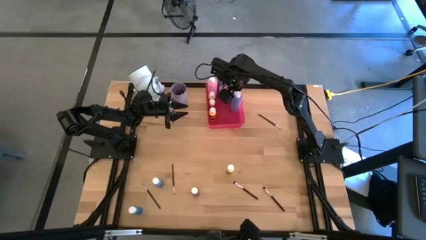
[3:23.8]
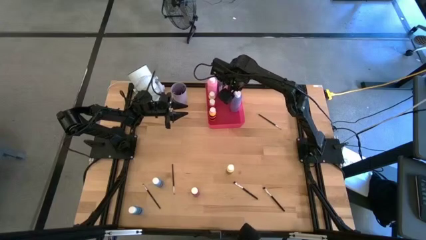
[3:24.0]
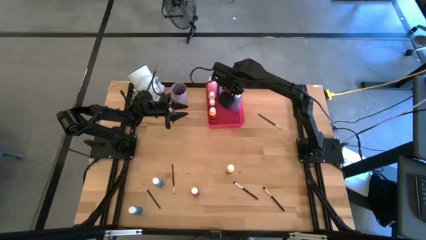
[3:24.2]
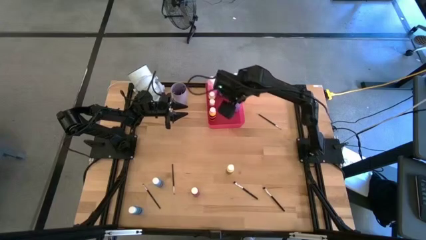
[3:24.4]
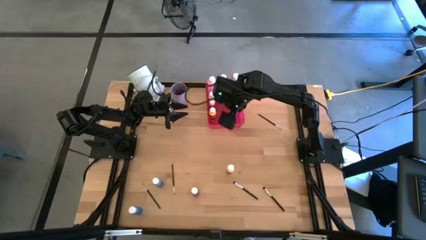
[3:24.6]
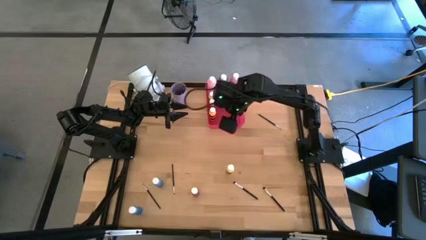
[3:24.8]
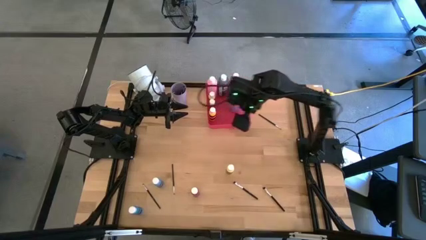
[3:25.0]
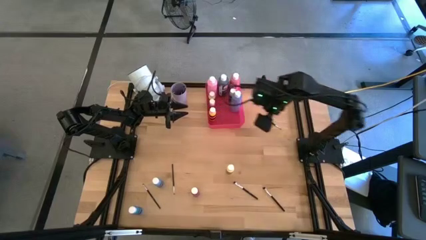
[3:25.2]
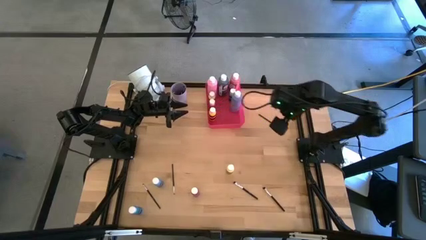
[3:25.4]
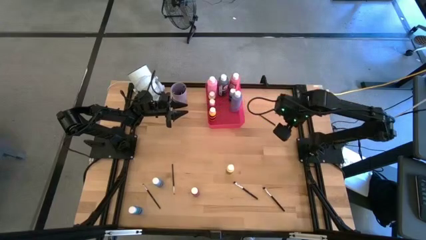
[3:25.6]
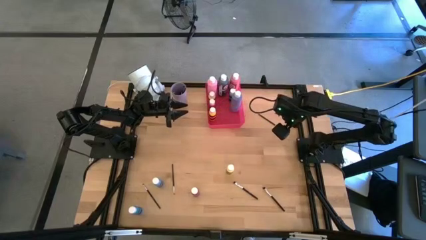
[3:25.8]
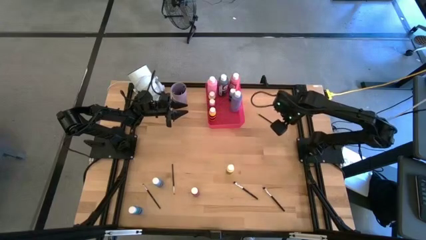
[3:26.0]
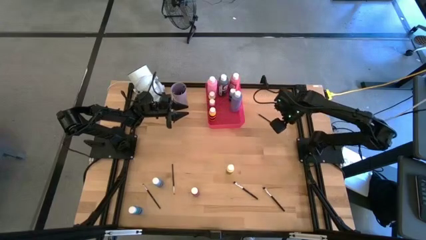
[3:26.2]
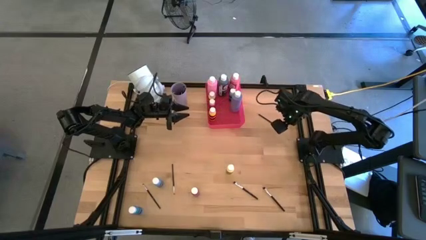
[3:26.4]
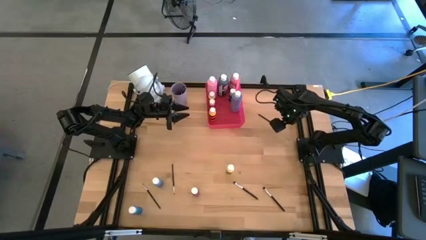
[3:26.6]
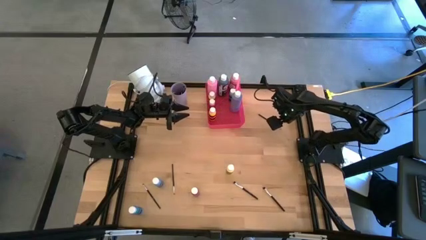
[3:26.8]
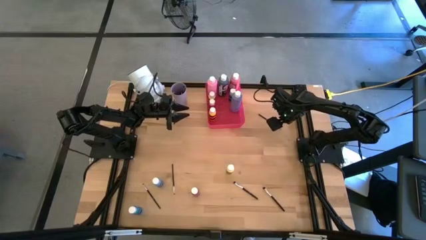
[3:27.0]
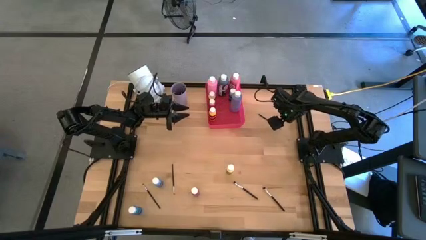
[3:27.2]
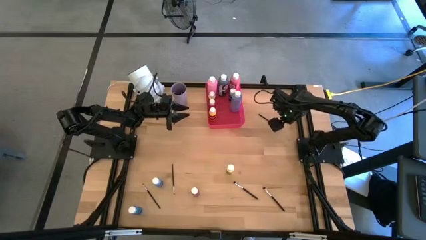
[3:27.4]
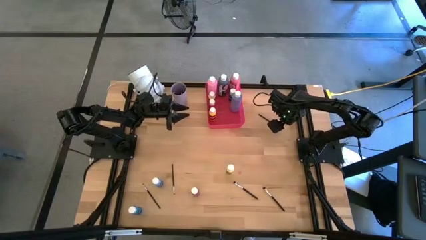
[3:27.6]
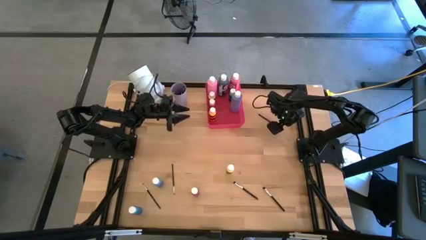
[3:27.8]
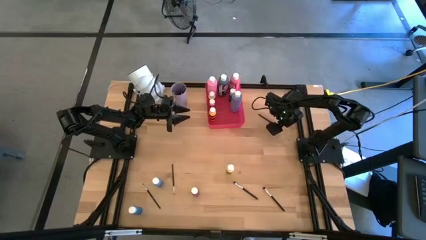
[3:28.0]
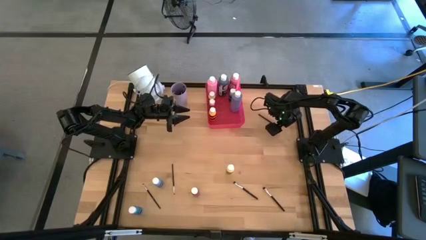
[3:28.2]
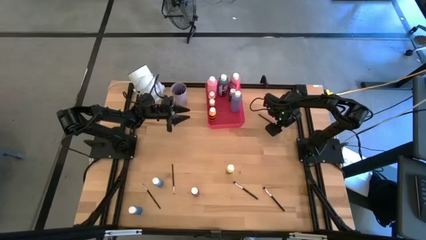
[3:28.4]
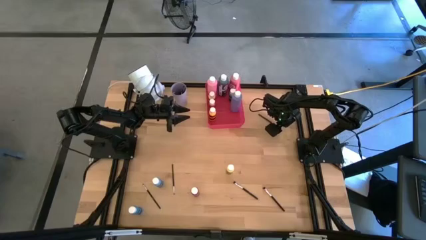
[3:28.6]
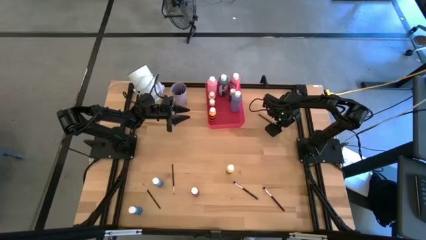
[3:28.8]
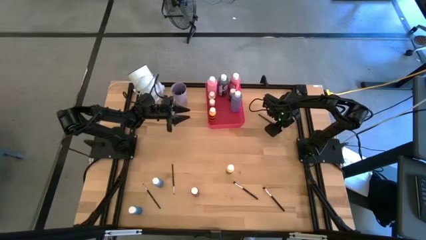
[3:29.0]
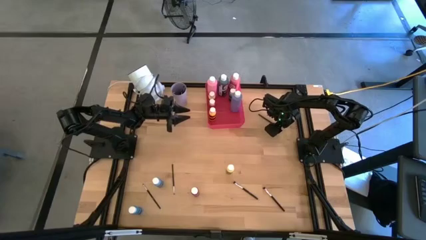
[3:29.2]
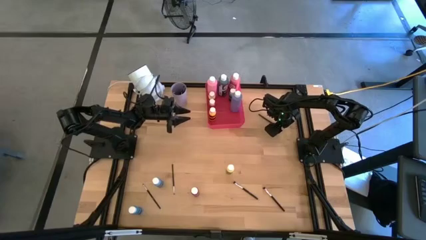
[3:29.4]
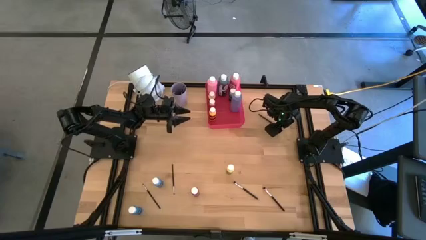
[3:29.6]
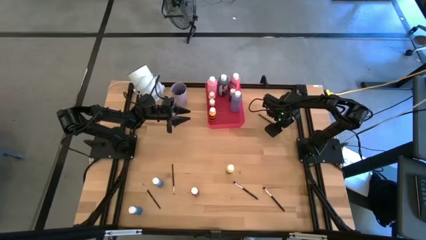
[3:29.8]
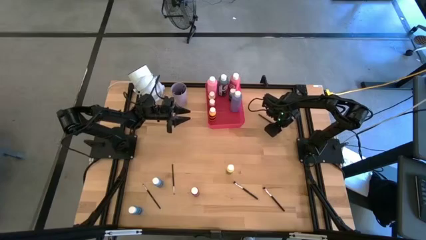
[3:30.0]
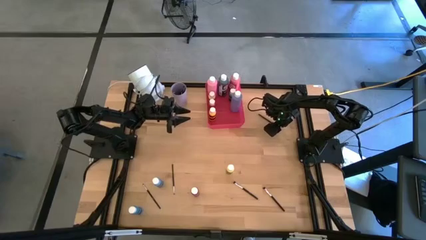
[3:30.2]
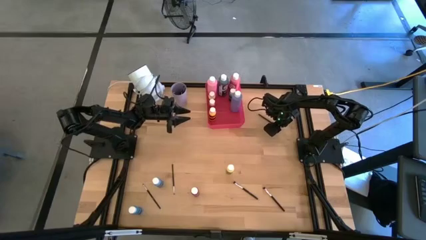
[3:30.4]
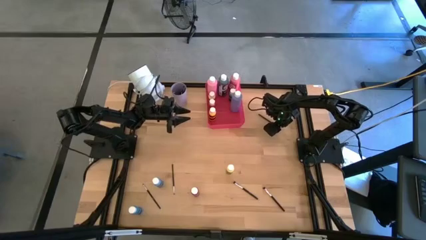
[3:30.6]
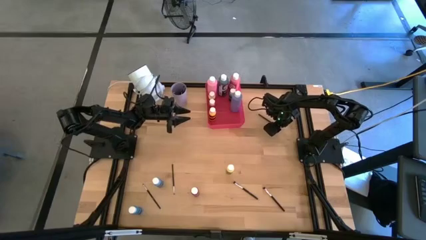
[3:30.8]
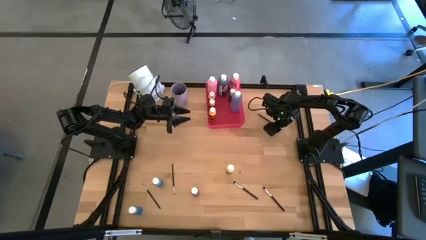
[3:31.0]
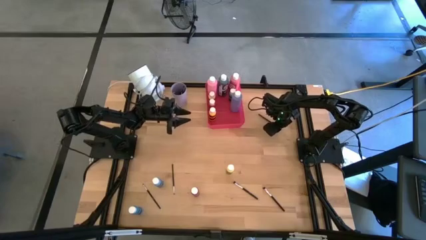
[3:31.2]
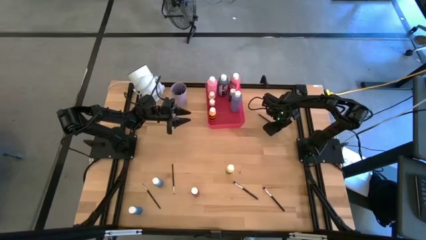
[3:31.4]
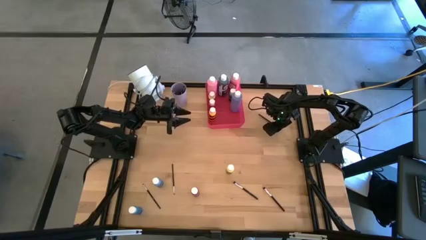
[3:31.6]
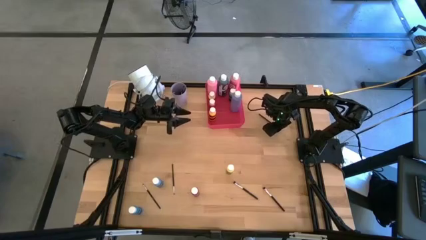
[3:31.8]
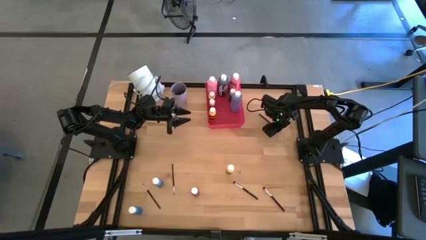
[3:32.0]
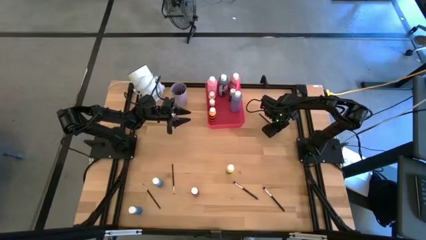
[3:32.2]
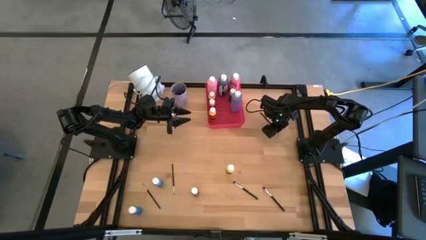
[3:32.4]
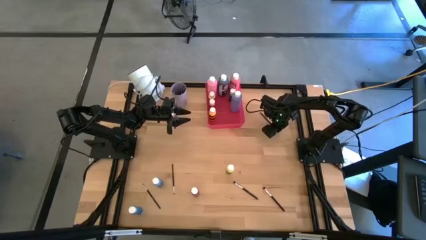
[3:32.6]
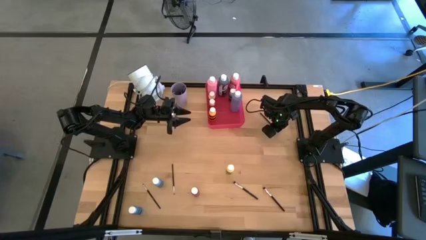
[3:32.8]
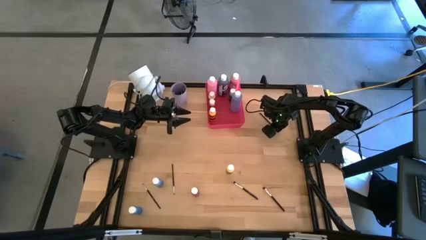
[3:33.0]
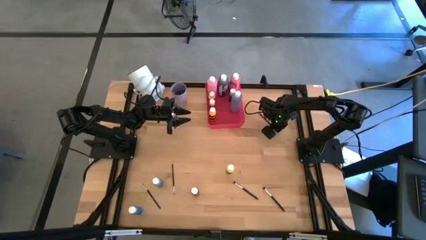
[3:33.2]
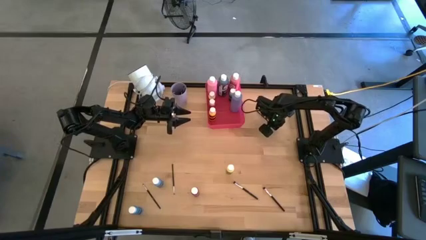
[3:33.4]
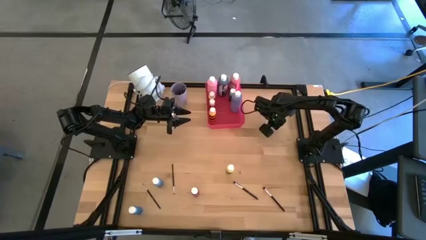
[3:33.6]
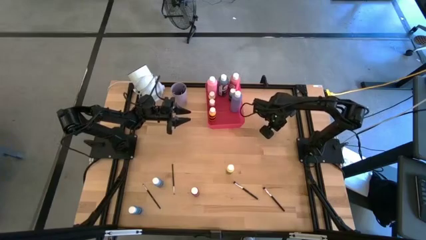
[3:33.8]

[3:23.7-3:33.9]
Task: Pick & Place Paint Supplies
Put the black paint brush into the purple cup

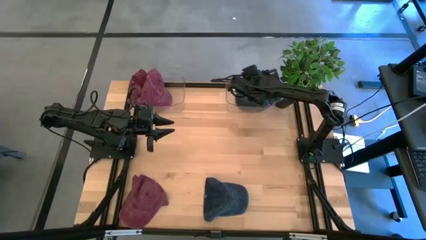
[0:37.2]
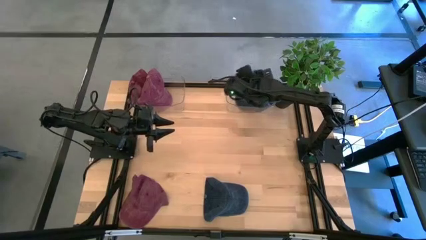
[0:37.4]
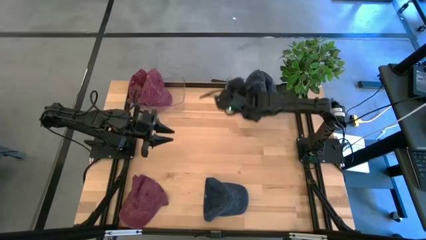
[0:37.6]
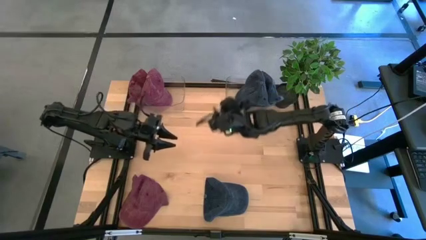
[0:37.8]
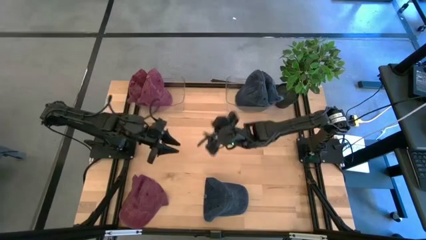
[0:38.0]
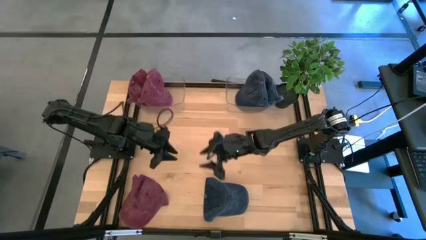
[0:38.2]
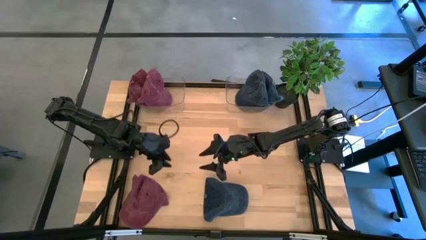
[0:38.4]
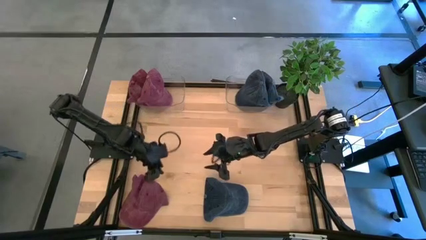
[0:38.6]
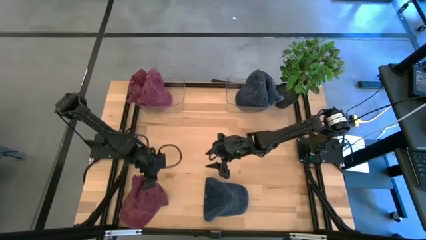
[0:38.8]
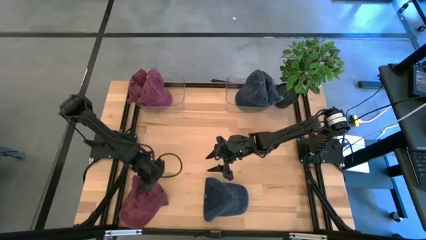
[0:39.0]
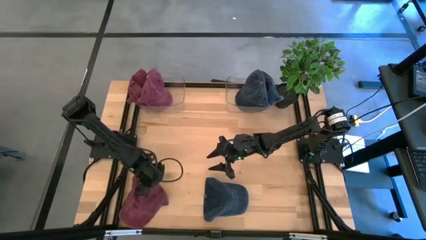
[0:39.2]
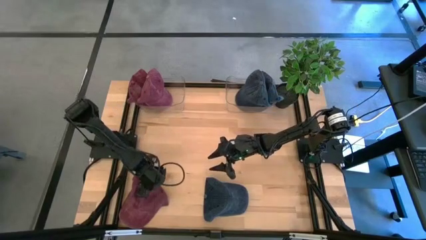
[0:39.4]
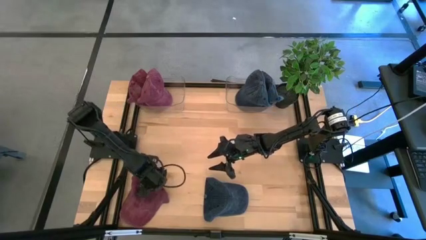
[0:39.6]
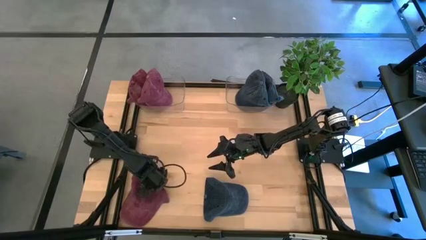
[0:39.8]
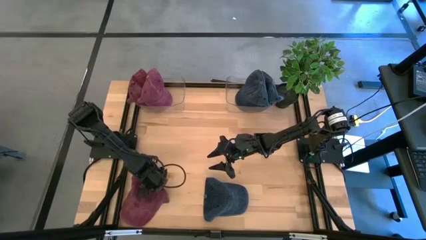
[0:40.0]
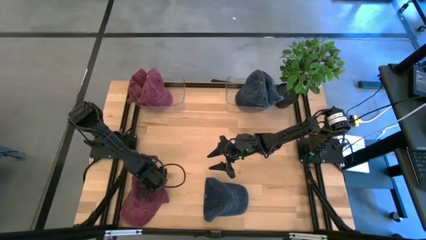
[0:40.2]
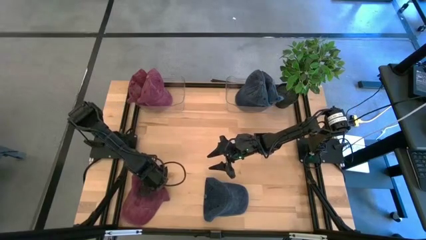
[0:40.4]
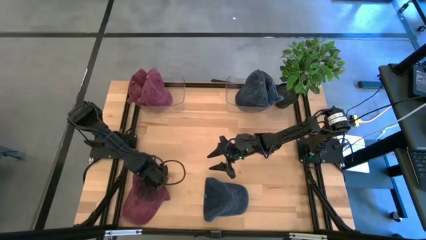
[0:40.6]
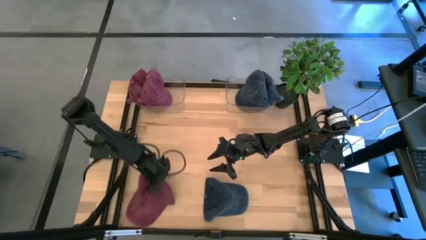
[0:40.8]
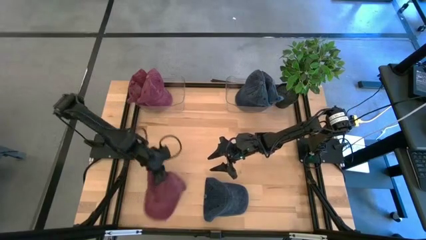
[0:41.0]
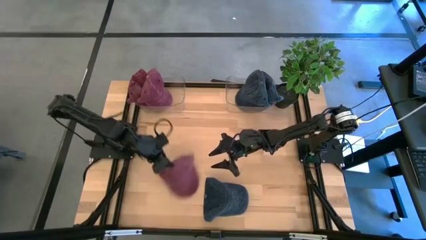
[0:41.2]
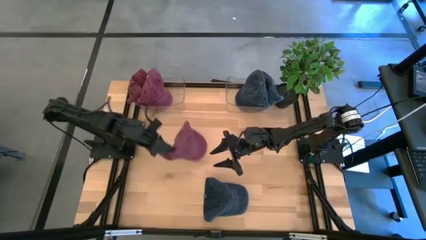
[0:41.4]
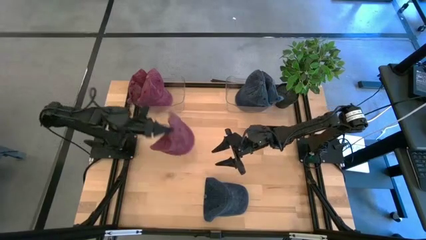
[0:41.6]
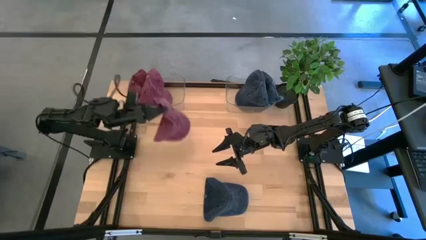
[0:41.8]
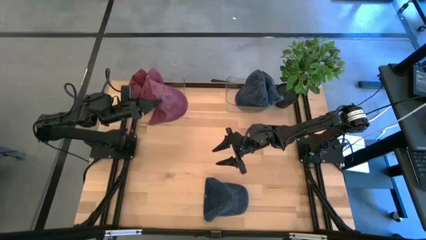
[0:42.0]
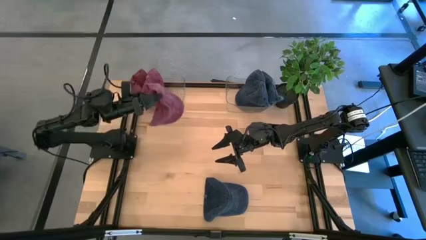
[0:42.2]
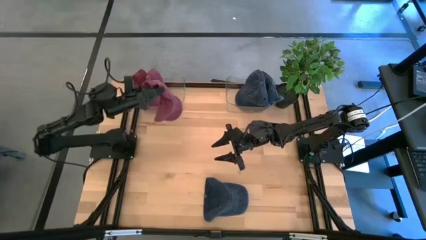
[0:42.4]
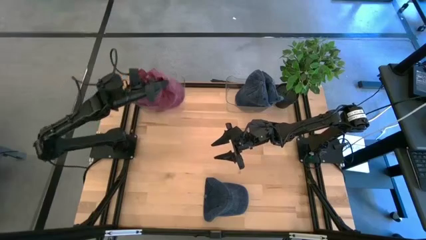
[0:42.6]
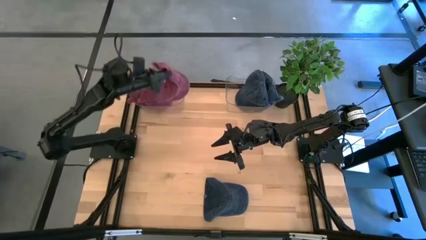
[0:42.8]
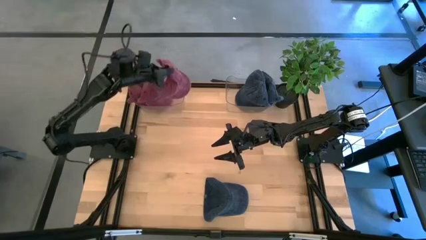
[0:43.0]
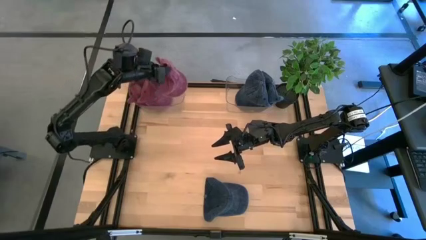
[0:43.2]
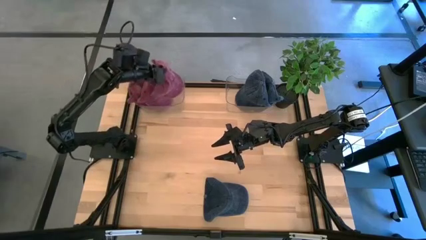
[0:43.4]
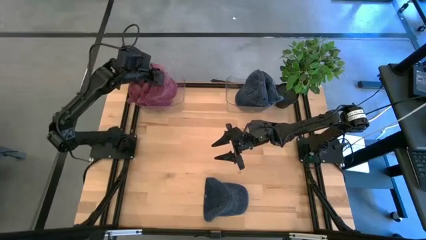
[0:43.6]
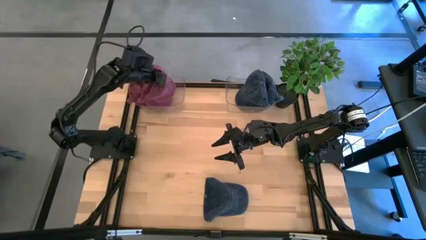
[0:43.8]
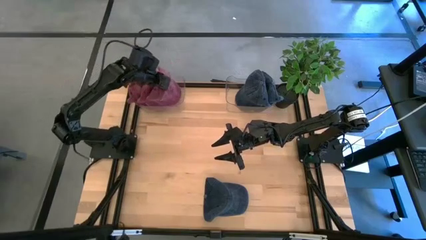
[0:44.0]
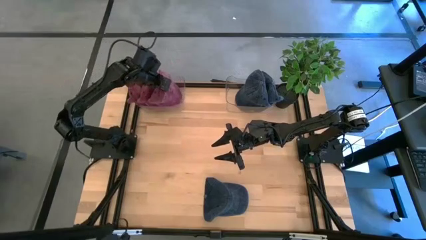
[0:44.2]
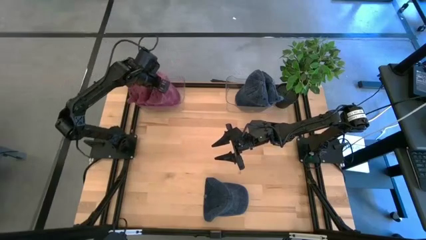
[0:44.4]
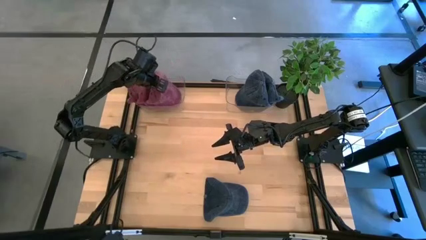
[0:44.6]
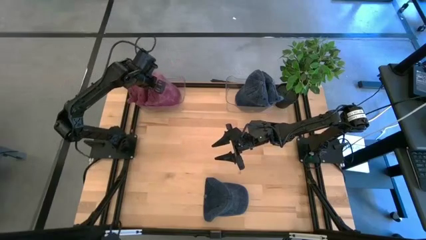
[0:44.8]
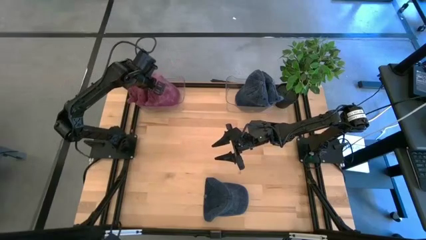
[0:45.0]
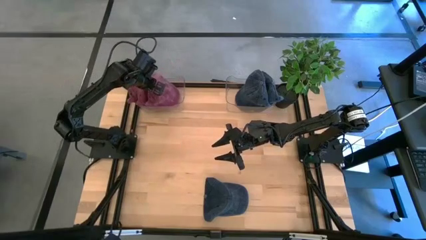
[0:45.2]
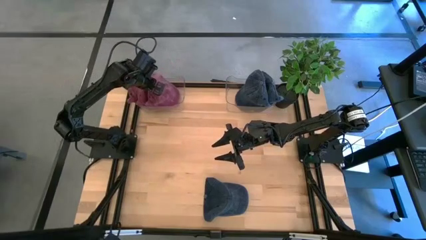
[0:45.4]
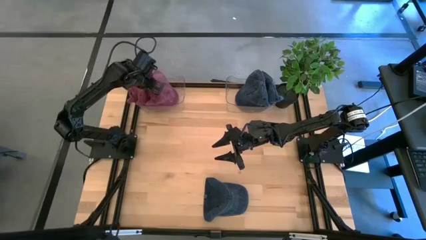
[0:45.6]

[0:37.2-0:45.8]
Task: Pick & Place hat
Put the maroon cap into the left transparent bin
